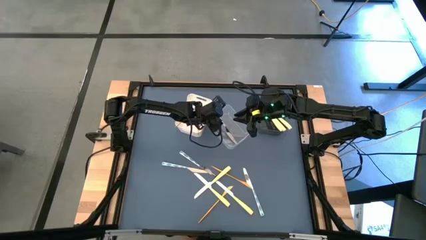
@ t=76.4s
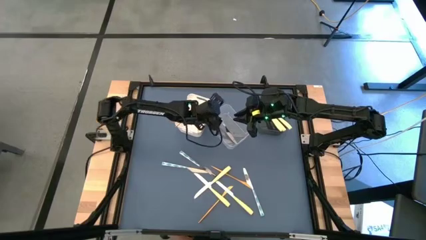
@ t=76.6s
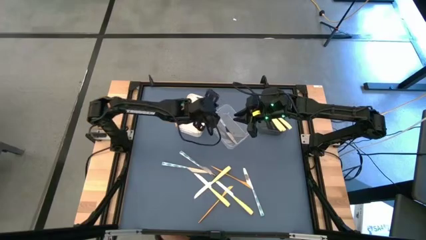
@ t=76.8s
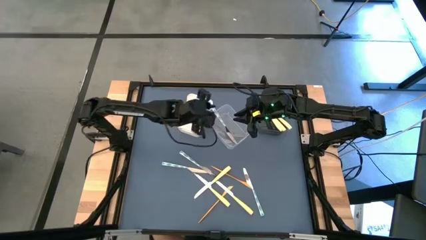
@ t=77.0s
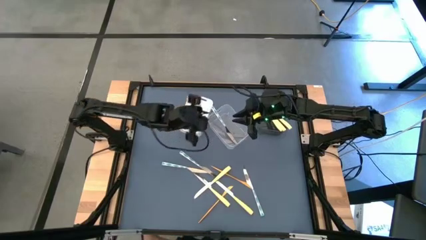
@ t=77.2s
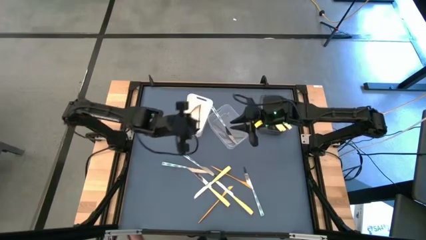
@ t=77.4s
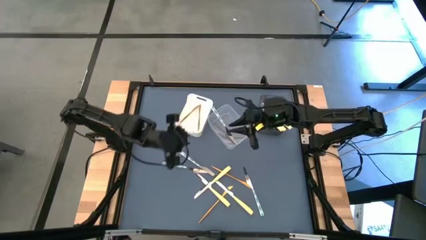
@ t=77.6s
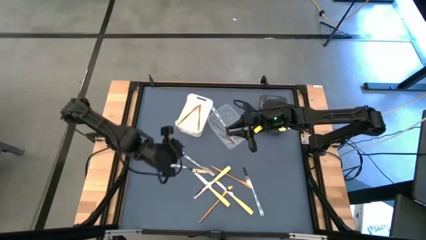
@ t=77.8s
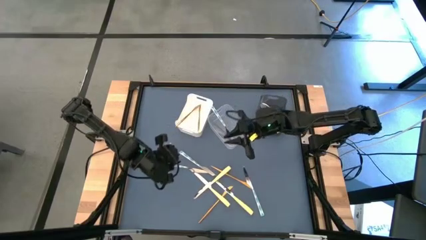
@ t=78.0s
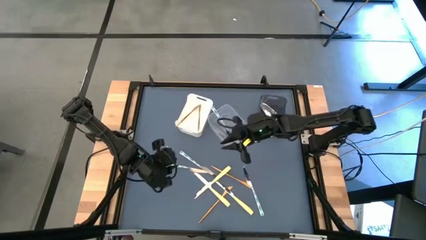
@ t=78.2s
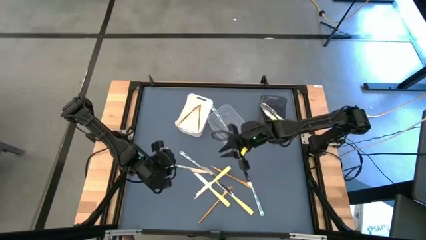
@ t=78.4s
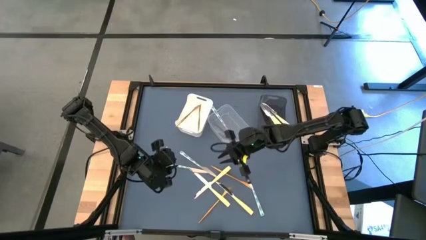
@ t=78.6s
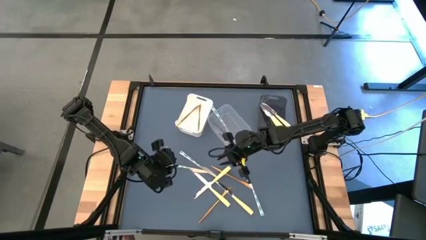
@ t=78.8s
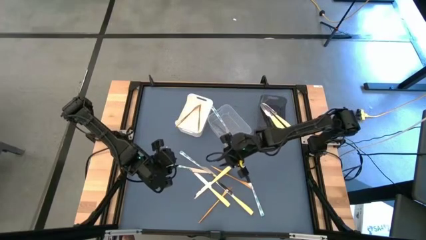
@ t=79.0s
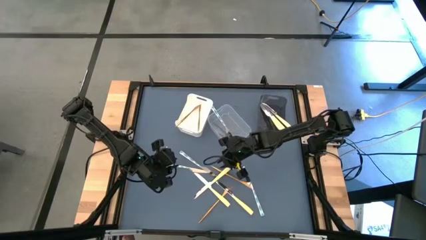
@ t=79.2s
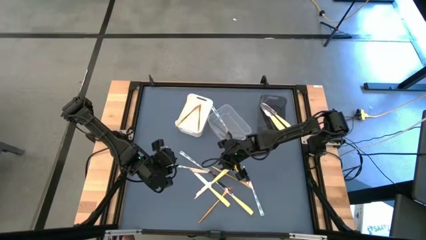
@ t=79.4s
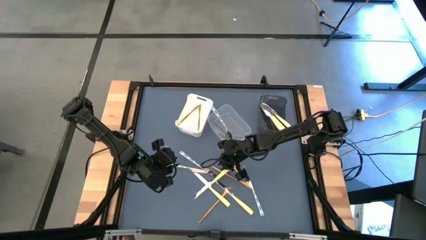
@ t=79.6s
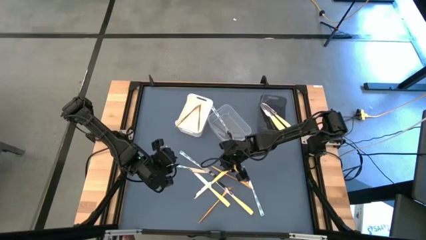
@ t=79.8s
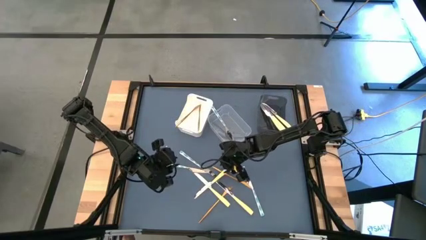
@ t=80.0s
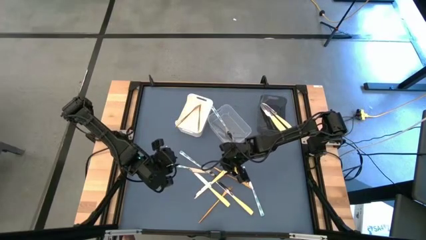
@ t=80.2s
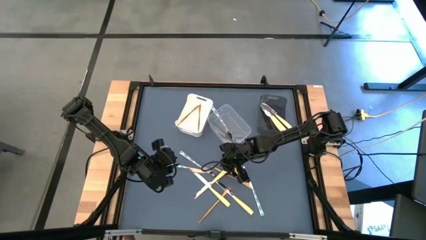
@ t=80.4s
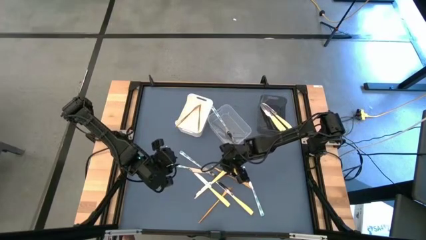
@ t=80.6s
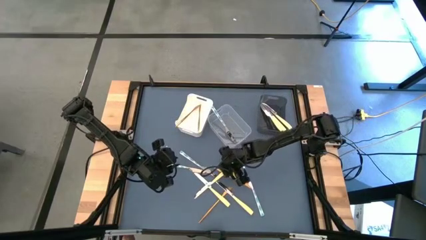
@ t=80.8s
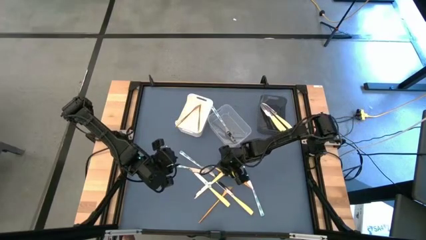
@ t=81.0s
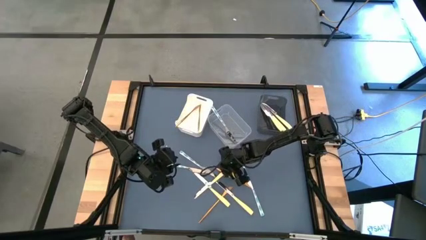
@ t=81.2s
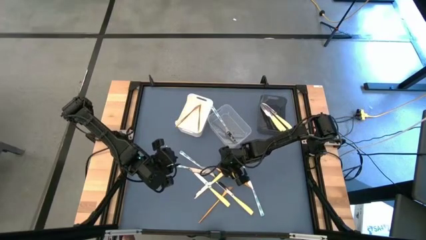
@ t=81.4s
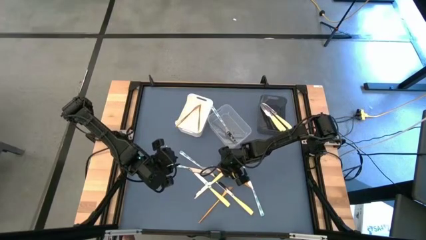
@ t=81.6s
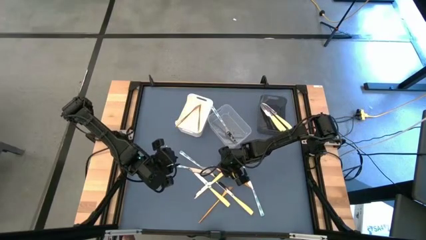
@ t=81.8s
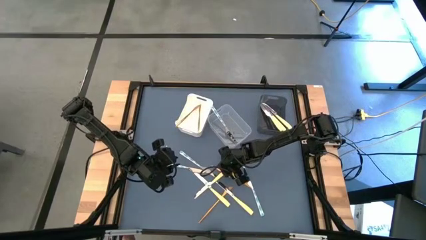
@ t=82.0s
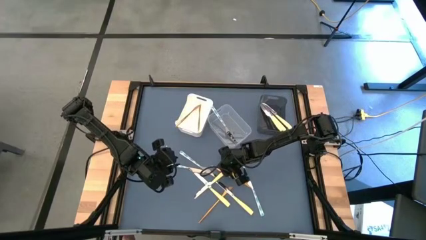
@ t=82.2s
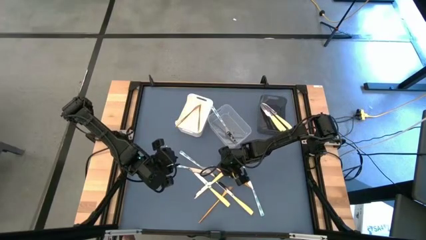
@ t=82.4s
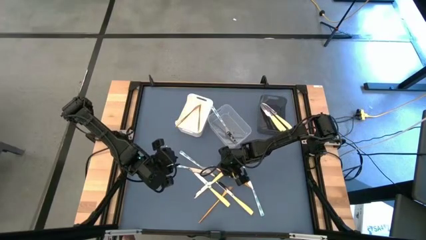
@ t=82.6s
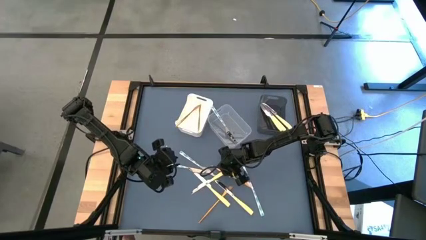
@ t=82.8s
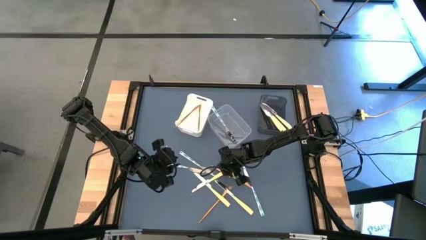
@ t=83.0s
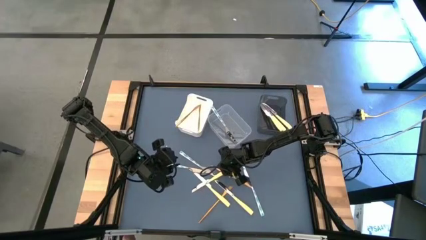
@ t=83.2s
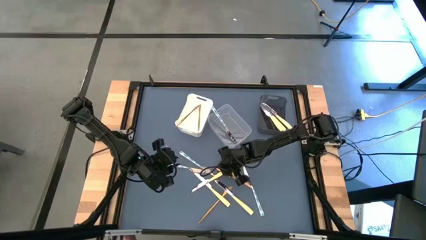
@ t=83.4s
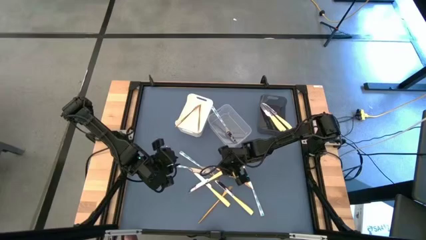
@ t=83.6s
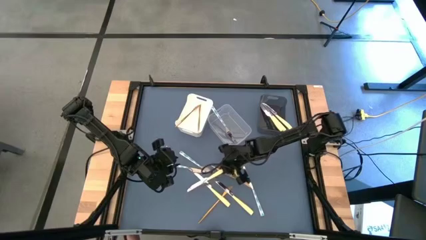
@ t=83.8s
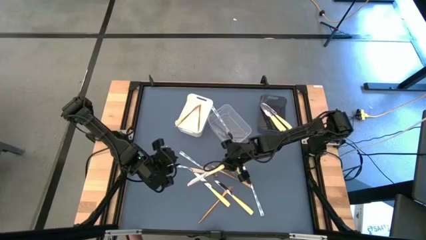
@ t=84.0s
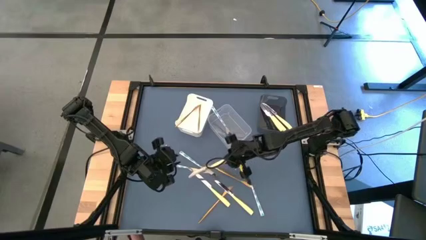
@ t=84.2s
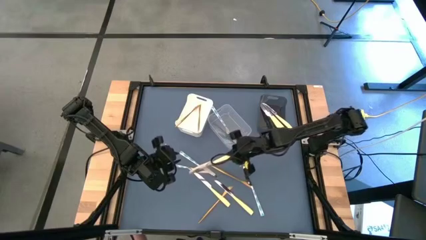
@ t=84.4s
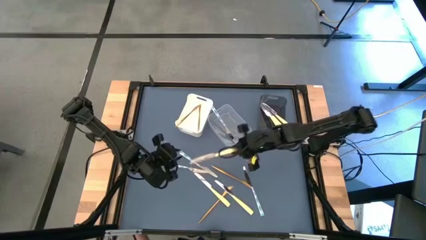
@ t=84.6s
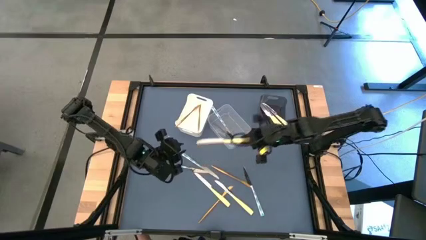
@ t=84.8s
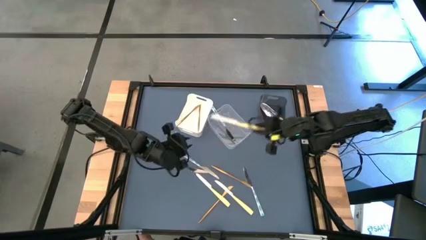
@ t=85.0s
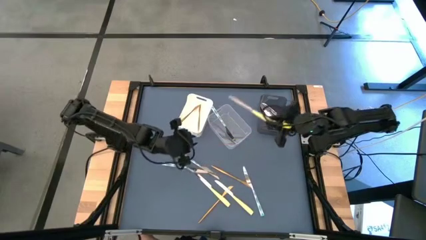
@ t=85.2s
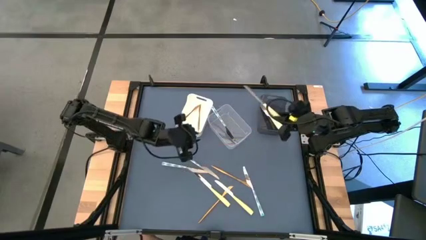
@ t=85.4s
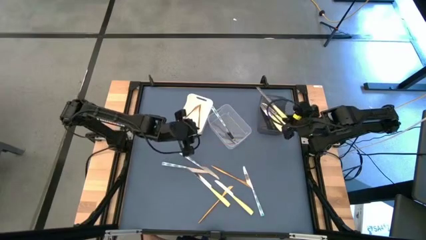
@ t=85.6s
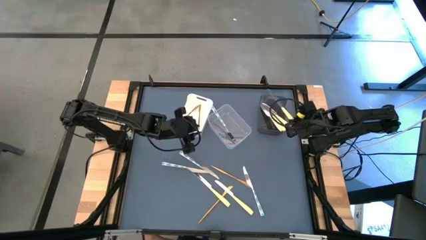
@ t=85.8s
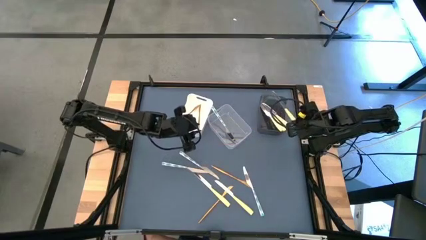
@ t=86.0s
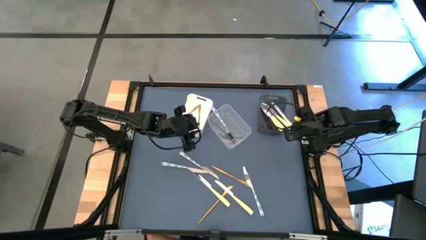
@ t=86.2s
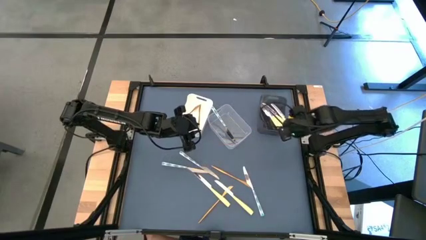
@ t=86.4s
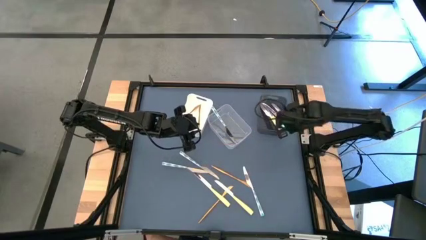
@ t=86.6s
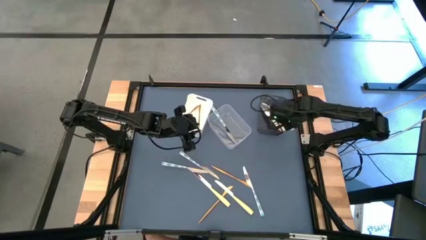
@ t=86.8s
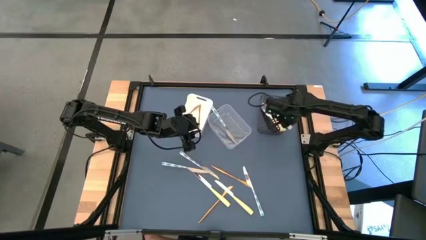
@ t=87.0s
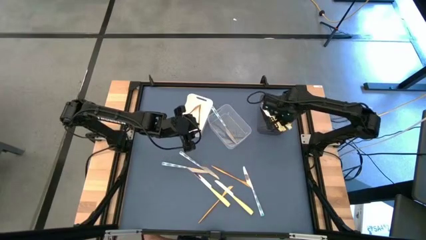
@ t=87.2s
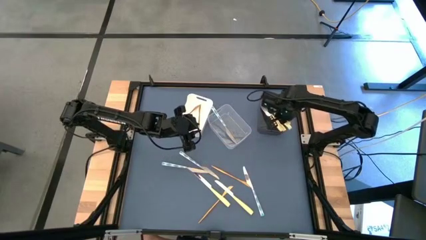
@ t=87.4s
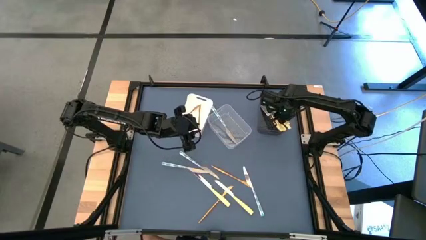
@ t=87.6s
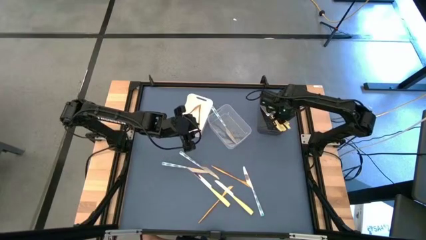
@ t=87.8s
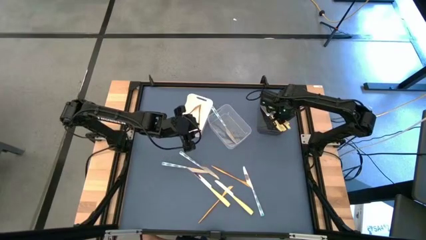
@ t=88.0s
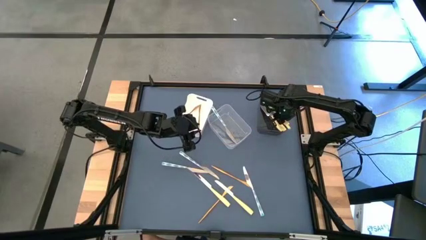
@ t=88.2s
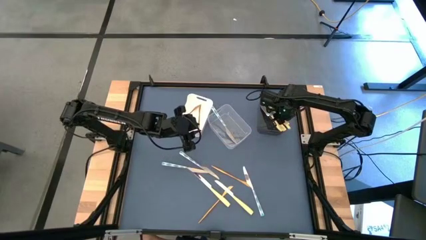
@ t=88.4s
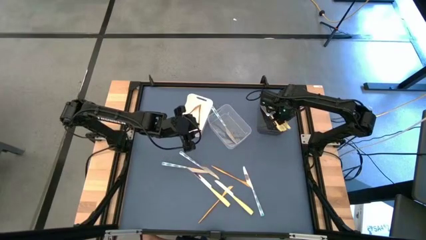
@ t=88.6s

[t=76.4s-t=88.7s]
Task: Sort silverware by color (type)
Put the yellow knife into the black bin
